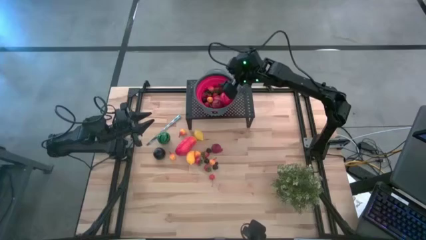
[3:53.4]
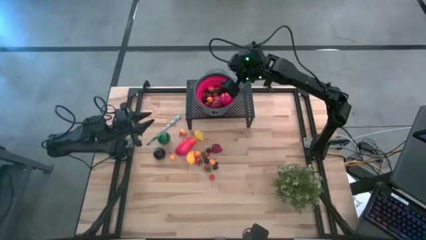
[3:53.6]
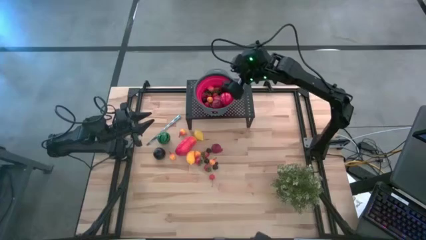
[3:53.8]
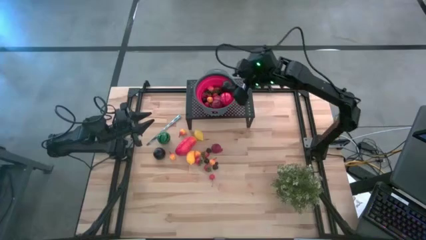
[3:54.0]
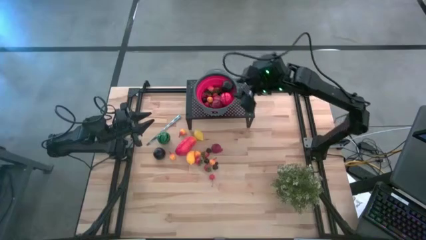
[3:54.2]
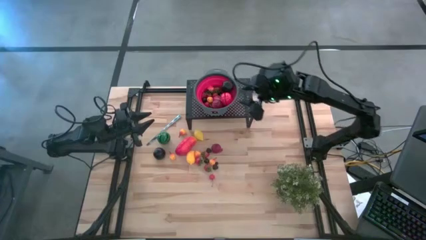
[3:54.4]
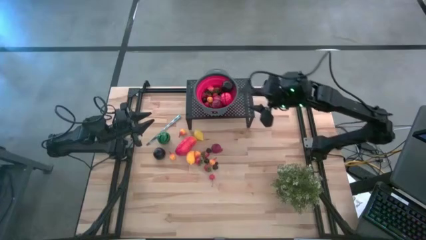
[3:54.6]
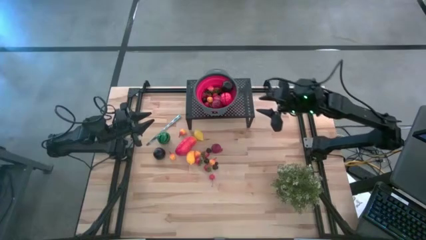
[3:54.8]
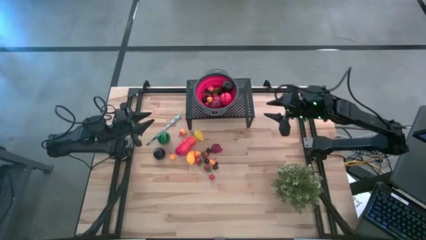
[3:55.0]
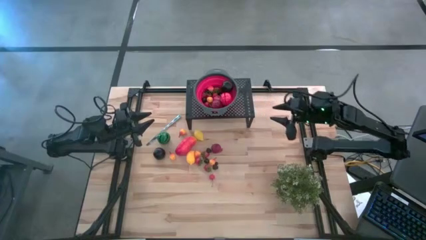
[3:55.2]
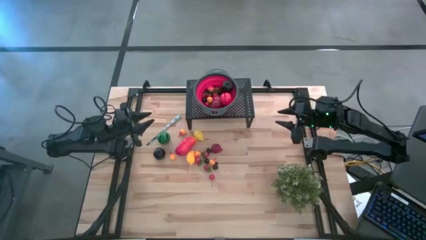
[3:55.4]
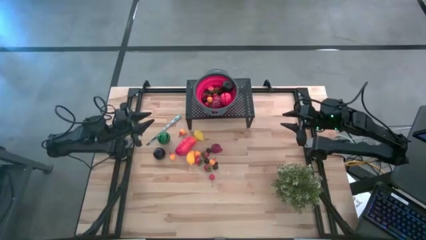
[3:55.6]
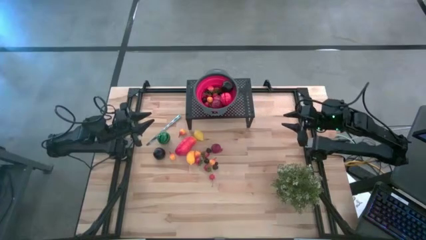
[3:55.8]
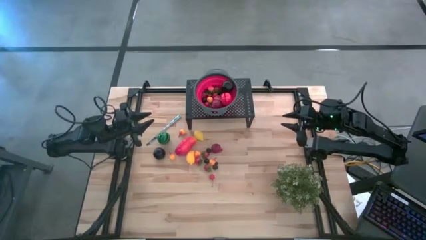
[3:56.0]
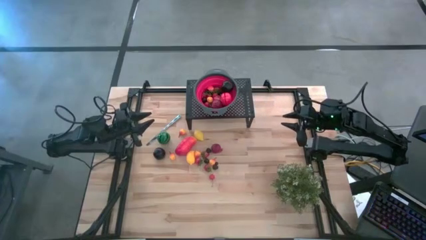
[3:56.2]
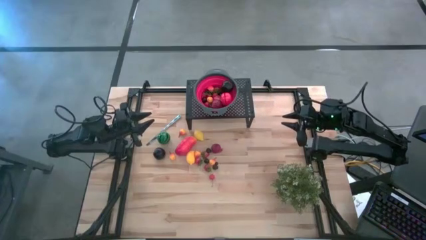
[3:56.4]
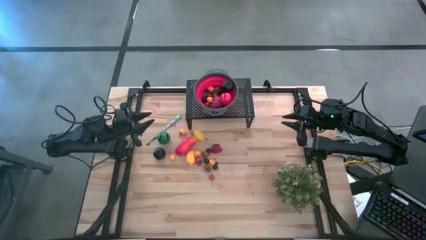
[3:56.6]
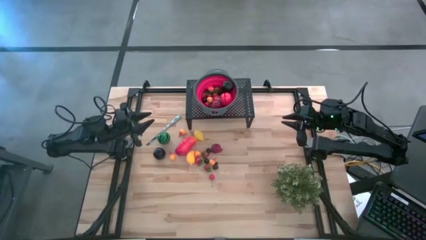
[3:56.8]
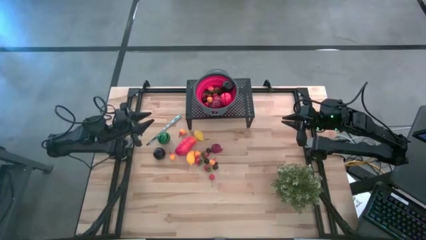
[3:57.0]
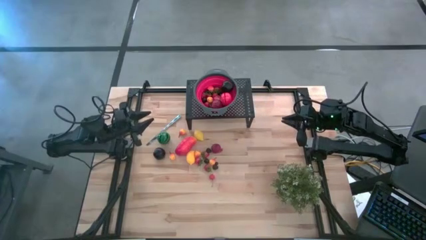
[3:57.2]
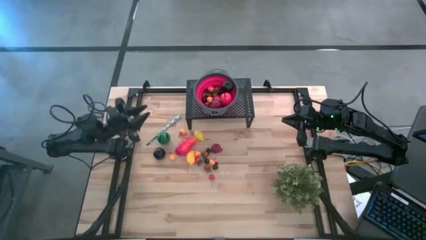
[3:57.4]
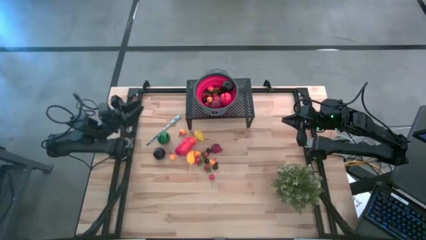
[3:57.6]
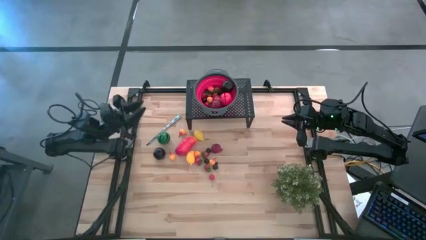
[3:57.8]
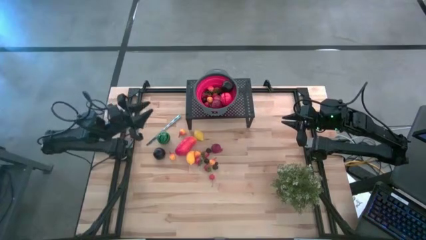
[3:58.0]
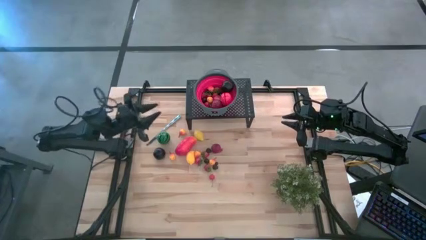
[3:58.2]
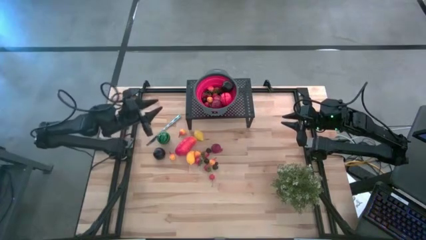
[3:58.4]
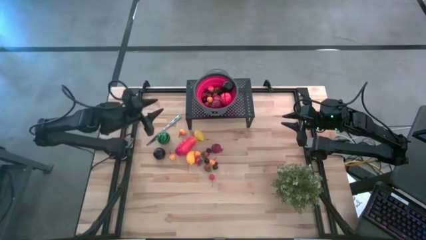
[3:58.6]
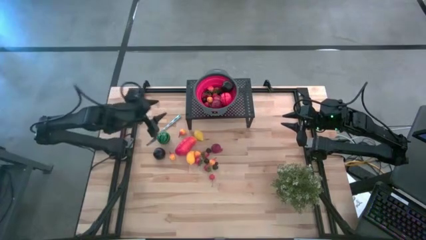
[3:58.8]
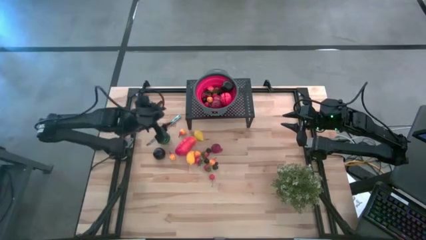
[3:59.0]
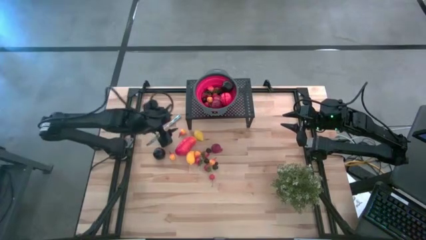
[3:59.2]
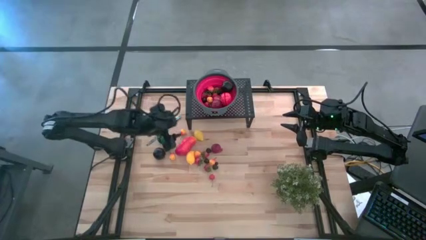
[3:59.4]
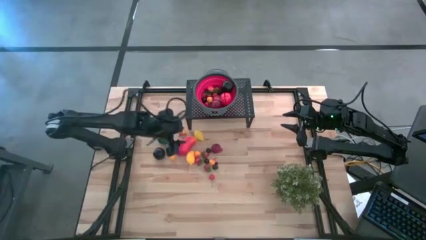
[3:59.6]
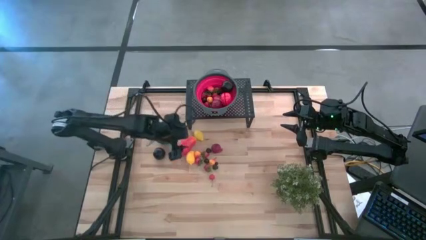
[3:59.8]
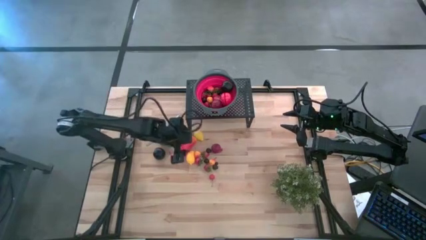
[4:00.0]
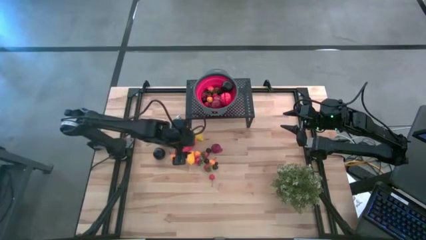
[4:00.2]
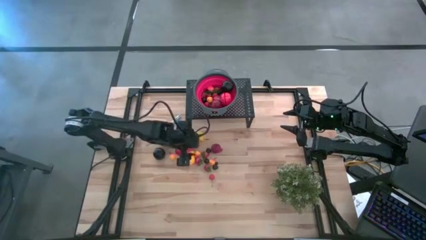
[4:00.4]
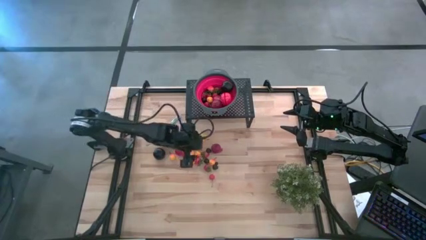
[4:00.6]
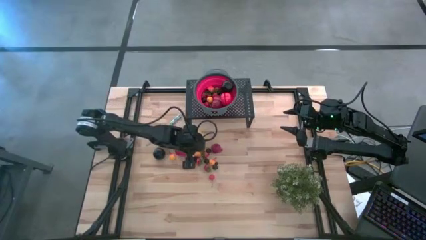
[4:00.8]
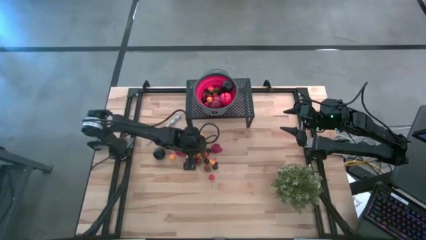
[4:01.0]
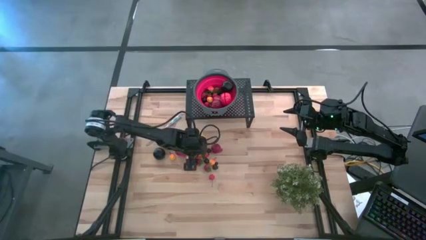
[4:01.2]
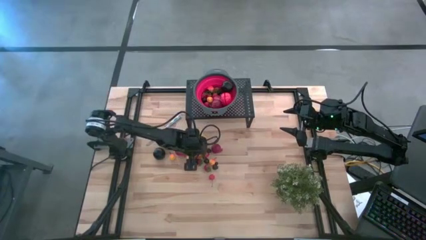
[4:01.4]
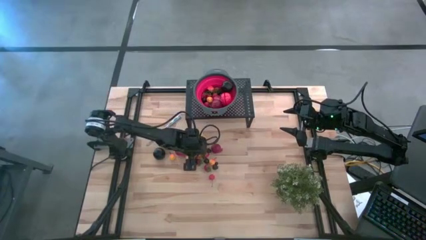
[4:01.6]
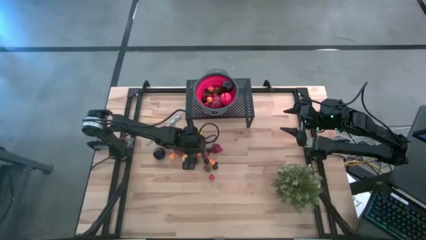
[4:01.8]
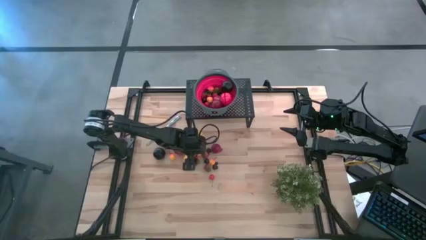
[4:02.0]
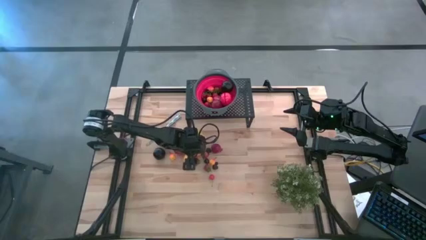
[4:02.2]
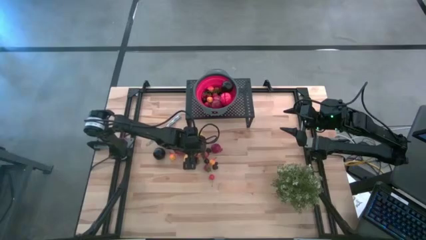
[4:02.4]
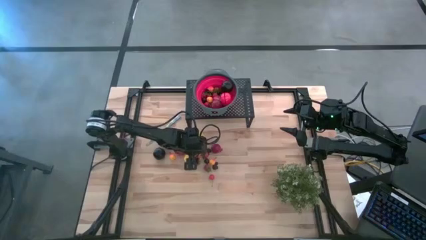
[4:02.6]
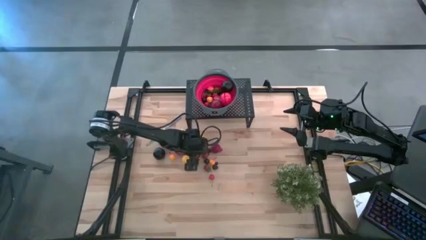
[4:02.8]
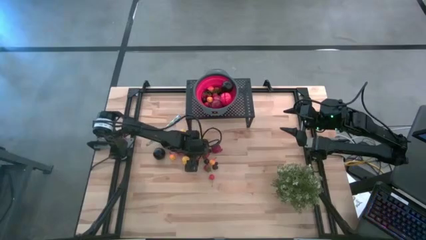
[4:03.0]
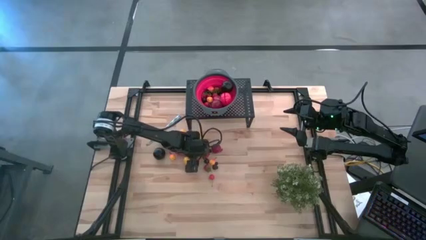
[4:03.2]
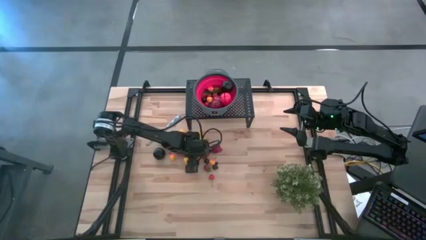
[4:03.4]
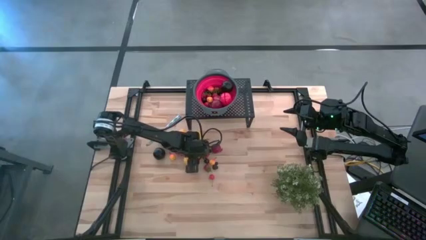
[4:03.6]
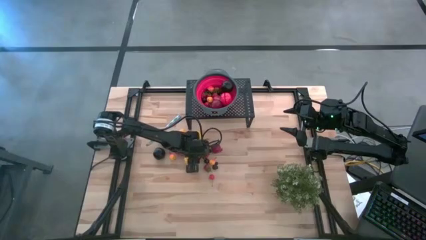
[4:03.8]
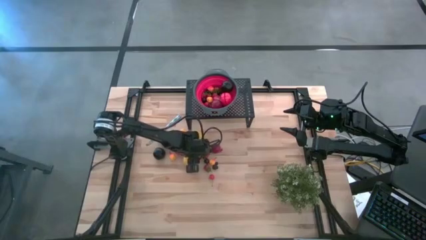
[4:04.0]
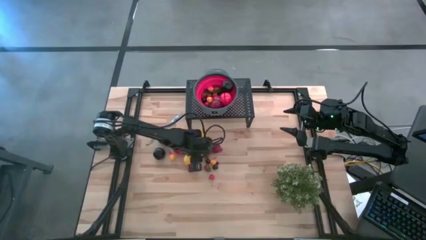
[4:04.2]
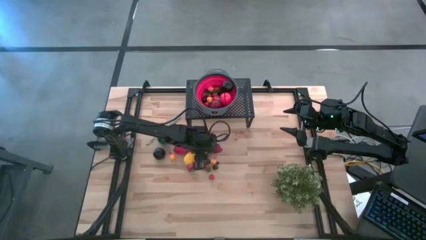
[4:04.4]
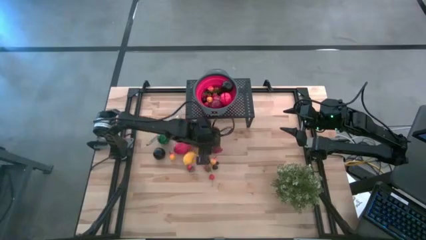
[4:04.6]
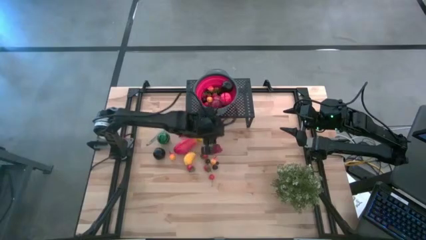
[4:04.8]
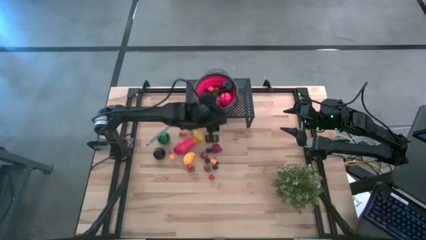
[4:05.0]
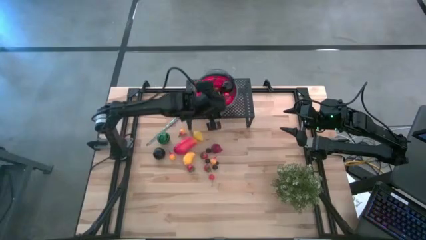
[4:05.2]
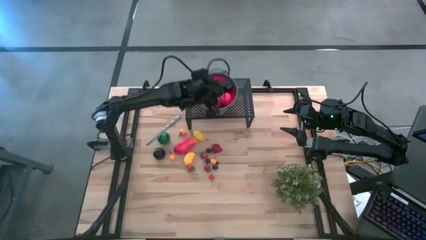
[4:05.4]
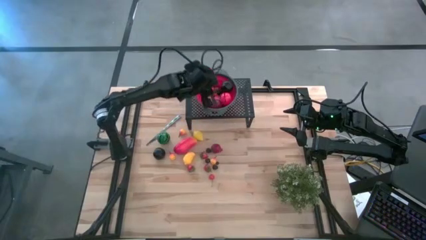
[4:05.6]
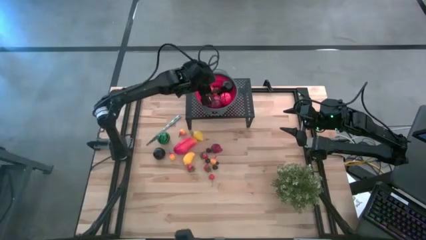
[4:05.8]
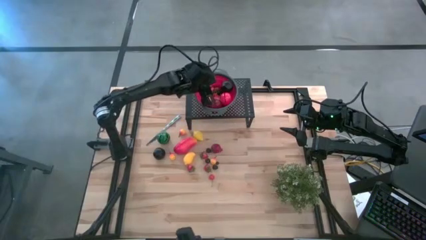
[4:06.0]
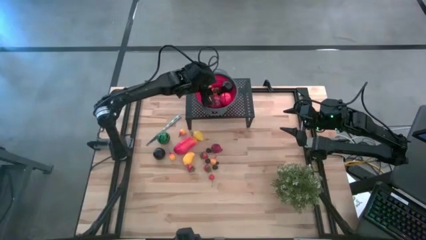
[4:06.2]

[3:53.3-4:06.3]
Task: Pick & Place Fruit
Put the peach in the red colander on the shelf

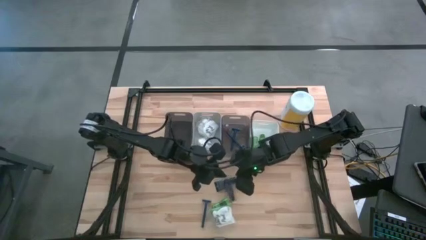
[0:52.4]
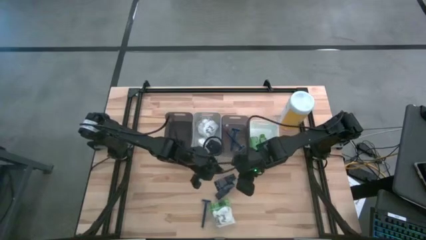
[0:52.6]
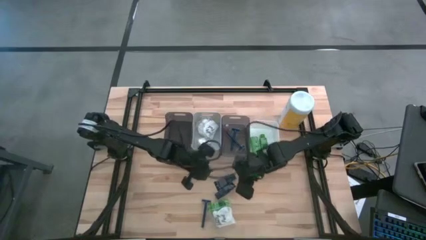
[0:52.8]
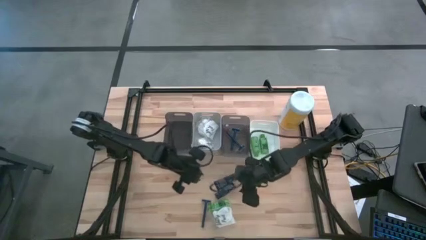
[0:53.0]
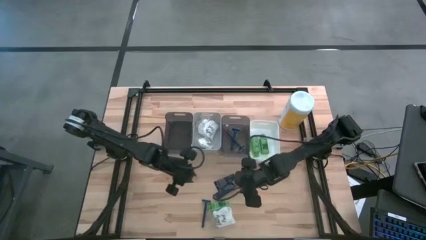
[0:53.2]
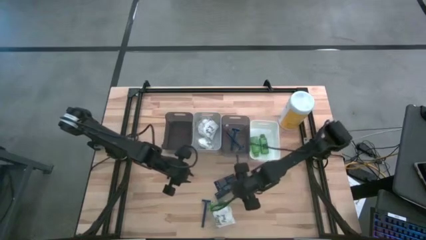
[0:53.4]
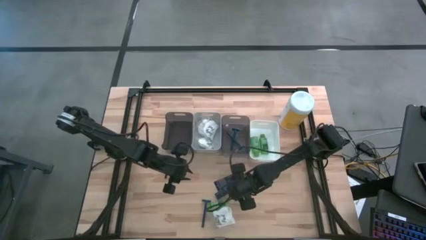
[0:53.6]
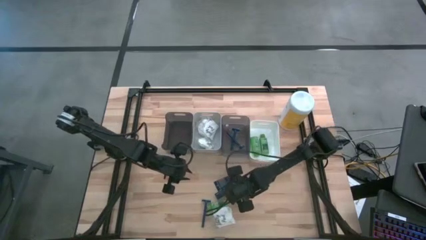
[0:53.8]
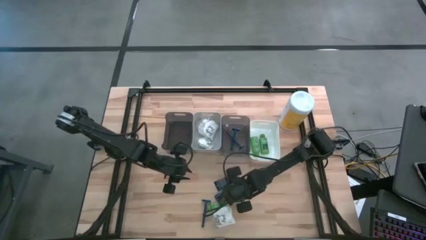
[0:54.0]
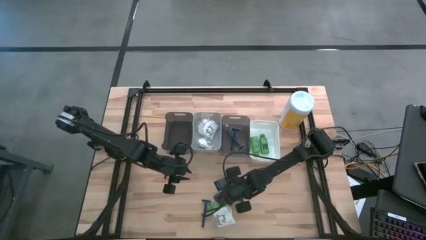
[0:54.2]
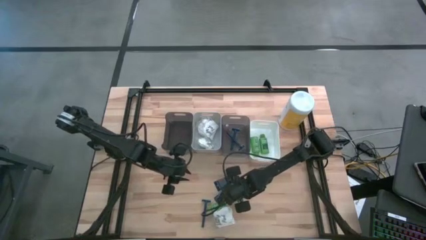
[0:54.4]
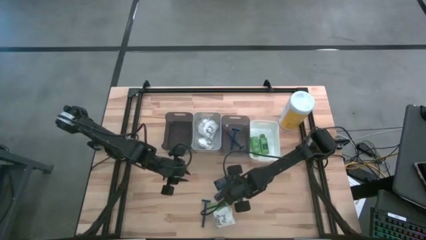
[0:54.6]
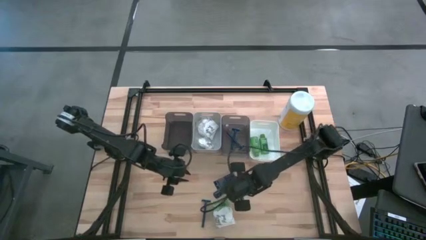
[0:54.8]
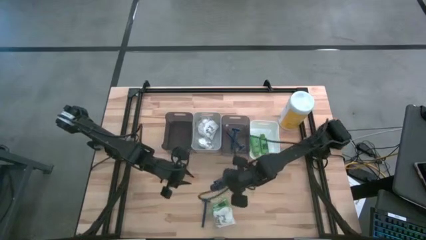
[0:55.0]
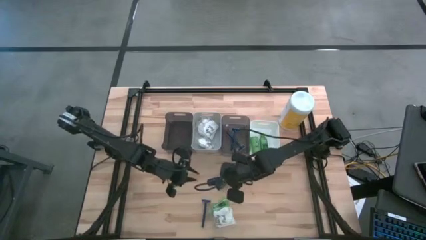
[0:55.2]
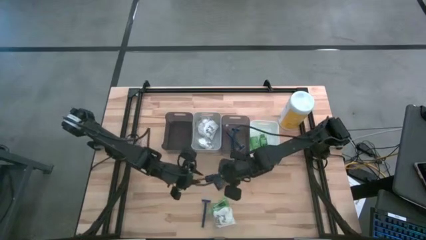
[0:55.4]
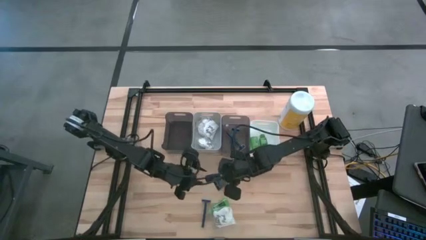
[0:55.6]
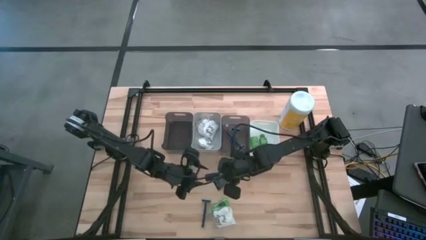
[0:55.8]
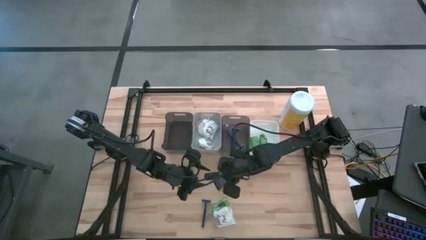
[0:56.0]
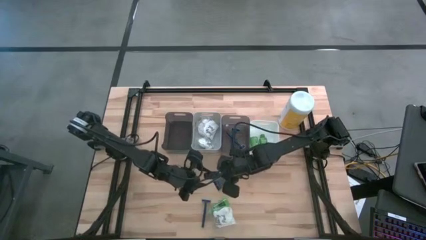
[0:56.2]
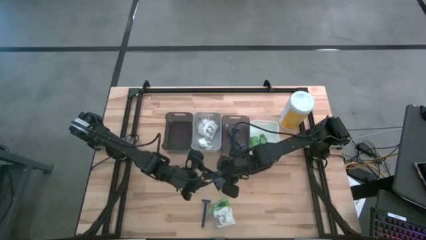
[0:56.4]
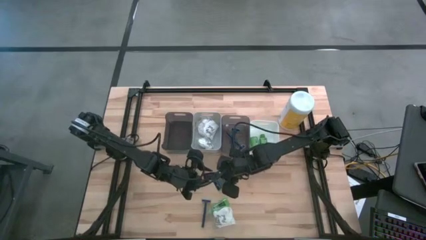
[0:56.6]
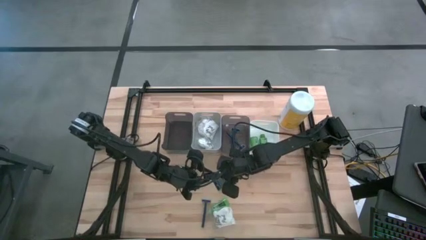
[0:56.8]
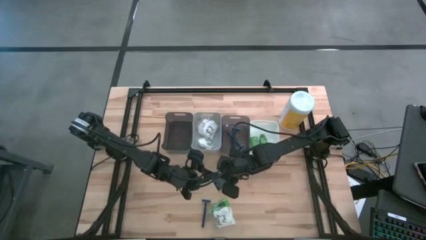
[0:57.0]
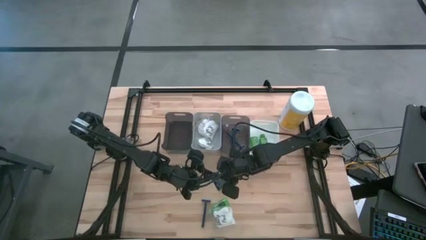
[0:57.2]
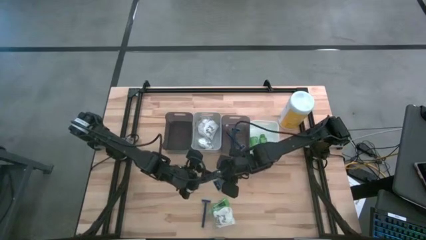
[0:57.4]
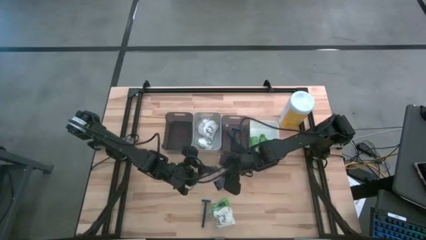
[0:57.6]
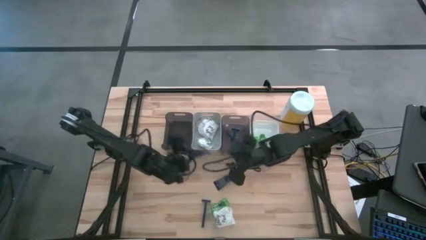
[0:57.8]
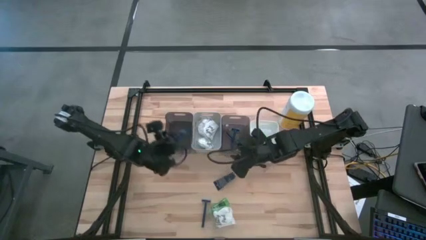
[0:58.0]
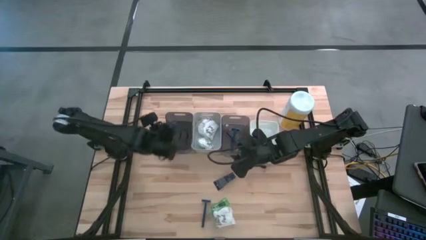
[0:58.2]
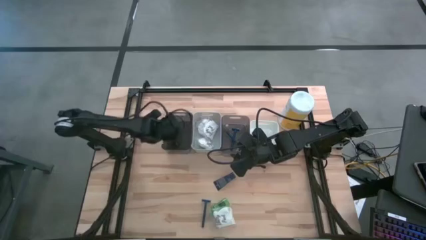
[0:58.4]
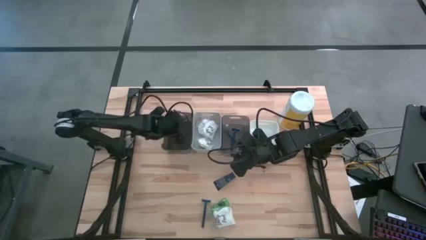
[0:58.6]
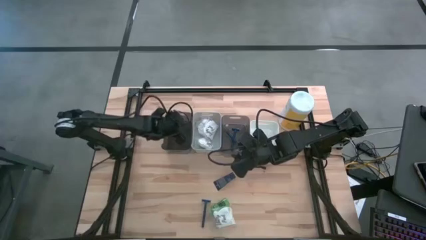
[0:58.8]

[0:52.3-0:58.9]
Task: Pick & Place Travel size toiletries
Put the blue shave cream into the left black bin
